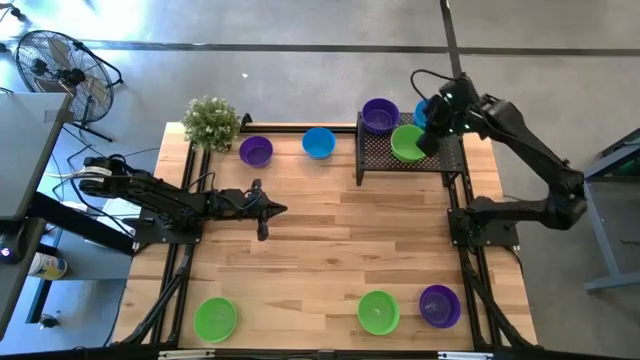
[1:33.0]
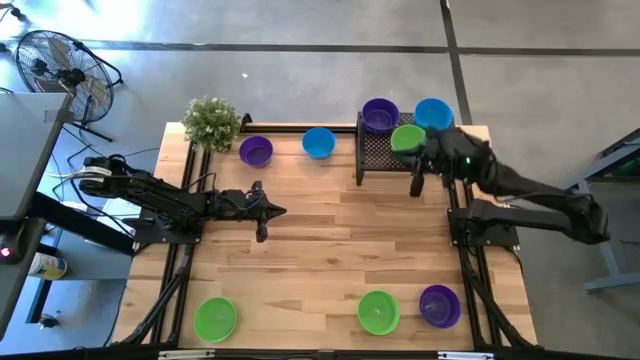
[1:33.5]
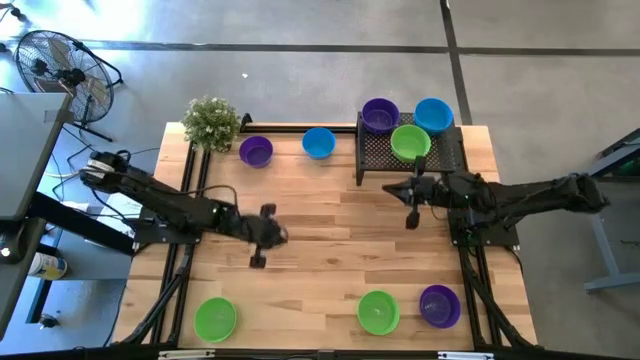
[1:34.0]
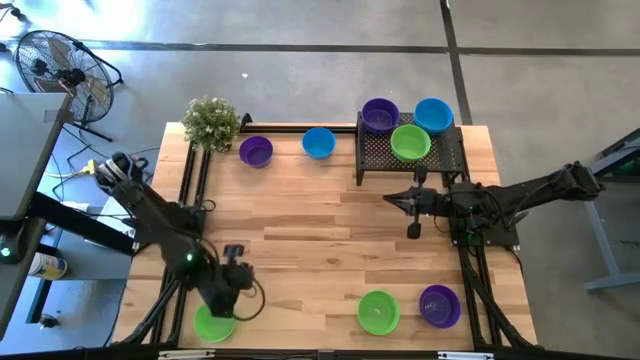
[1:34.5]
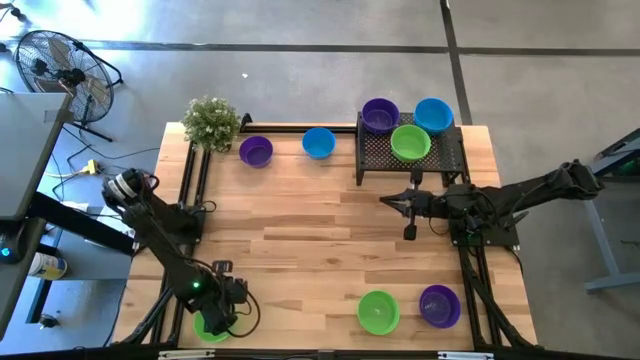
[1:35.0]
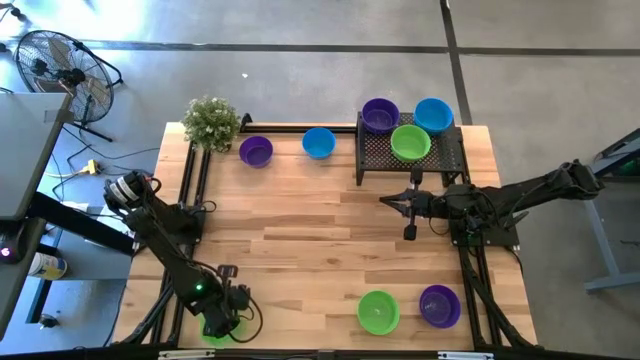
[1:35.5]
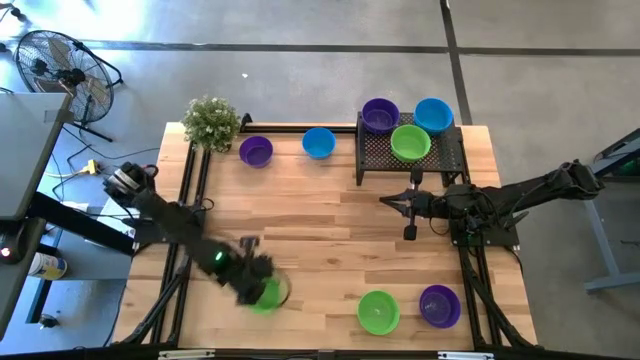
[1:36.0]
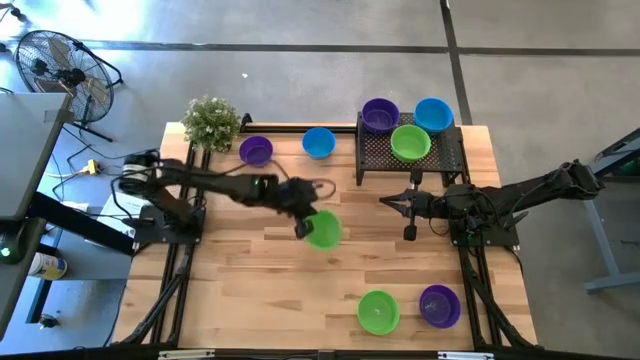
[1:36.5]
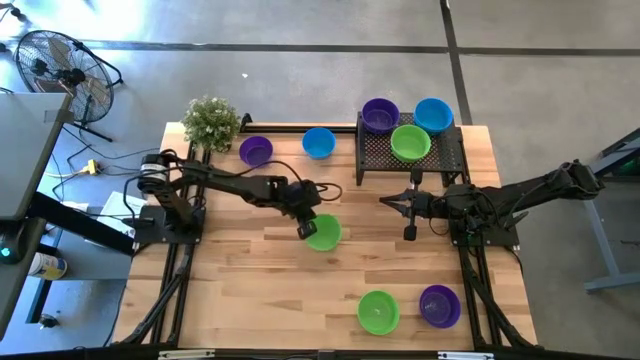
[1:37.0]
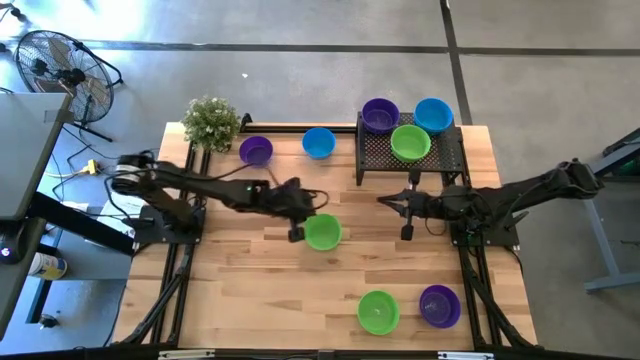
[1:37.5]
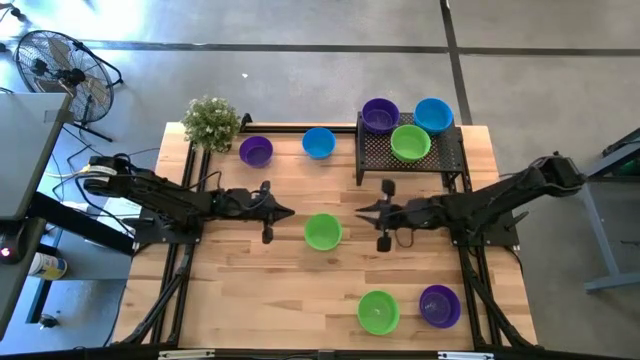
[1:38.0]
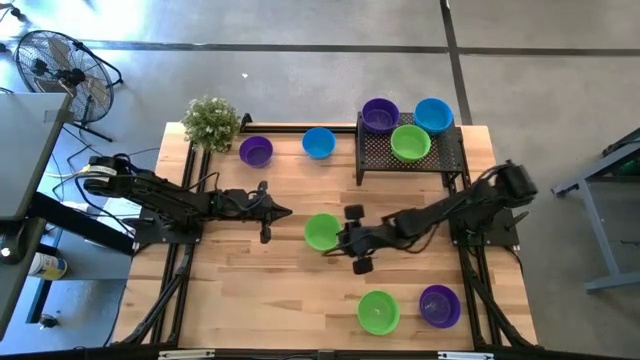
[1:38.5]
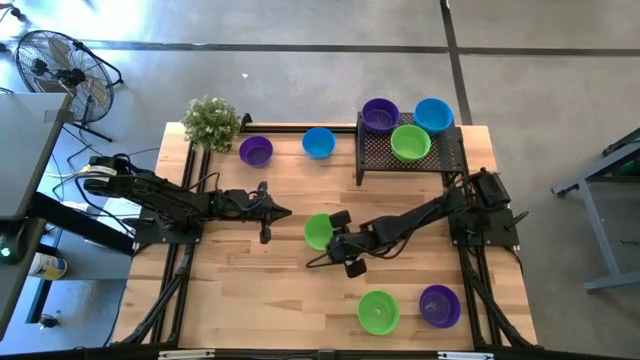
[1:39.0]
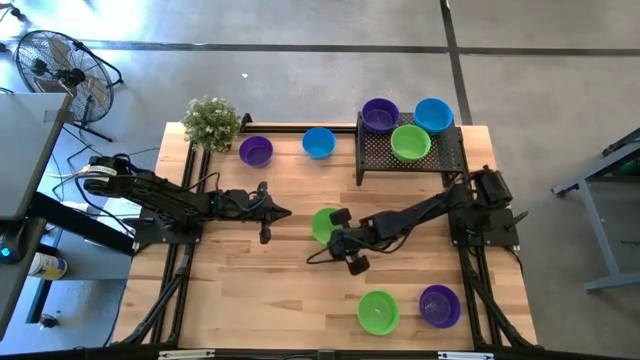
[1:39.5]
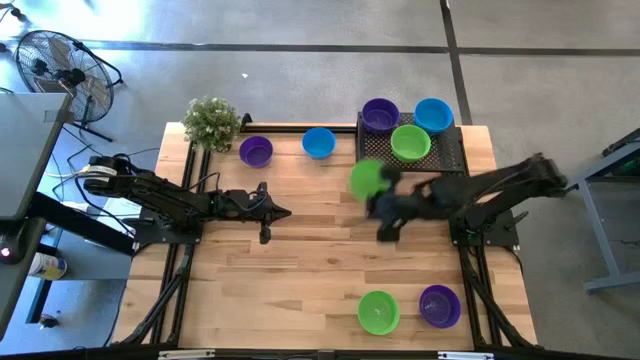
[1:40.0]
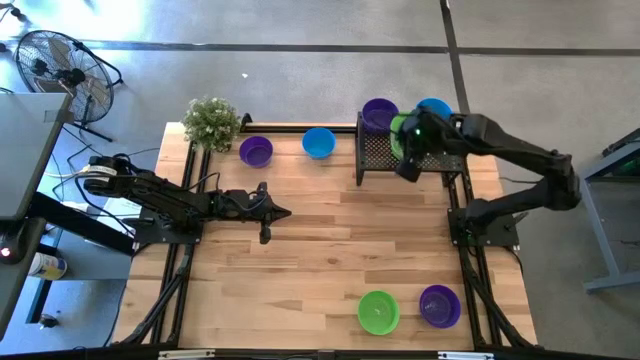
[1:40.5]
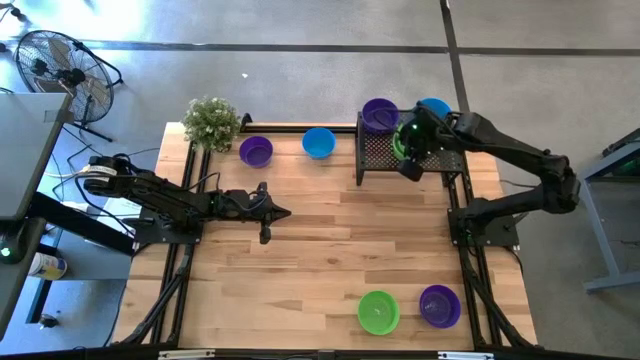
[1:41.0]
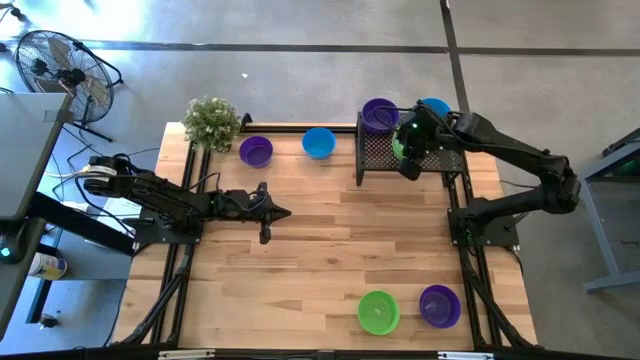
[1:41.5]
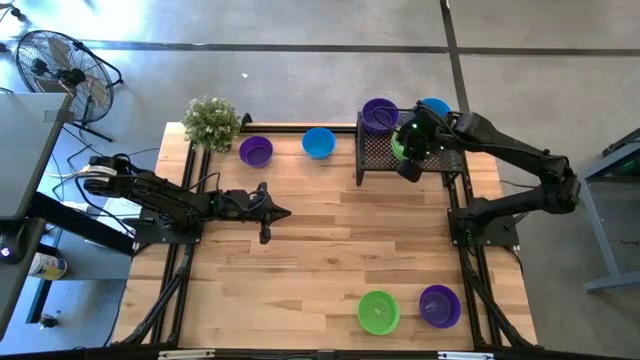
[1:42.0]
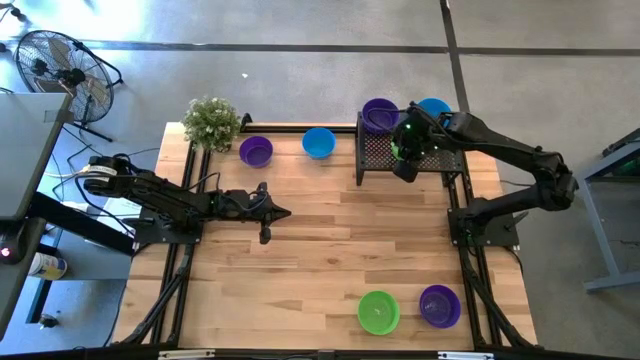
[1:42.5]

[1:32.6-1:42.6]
Task: Pick & Place Mini bowls
Stack the green bowl on the other green bowls on the shelf

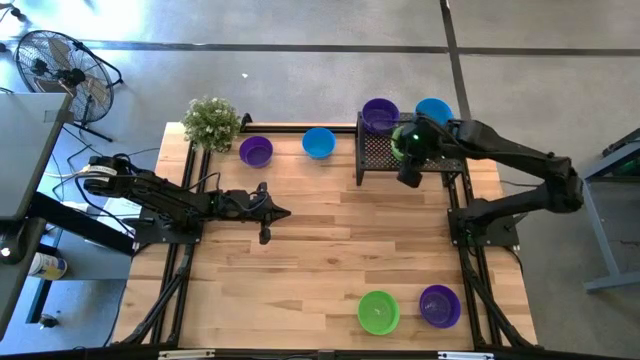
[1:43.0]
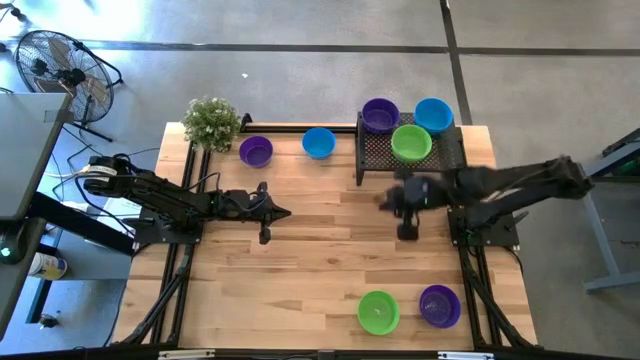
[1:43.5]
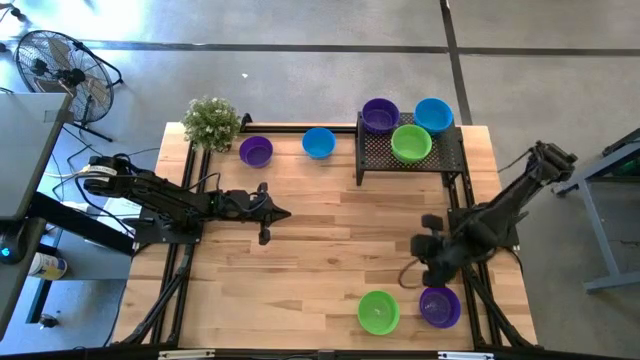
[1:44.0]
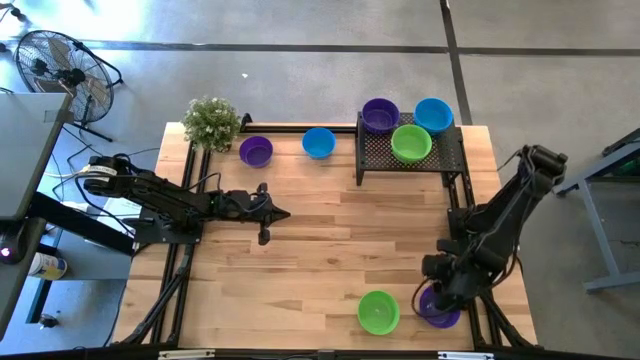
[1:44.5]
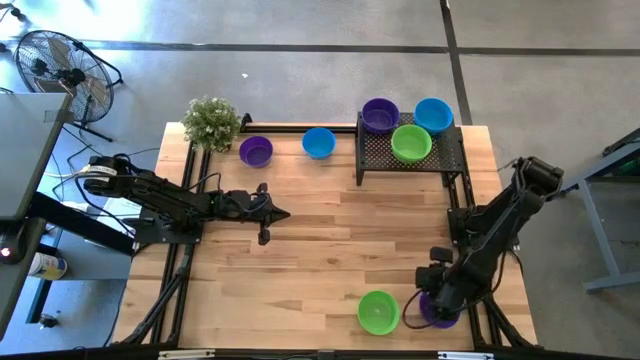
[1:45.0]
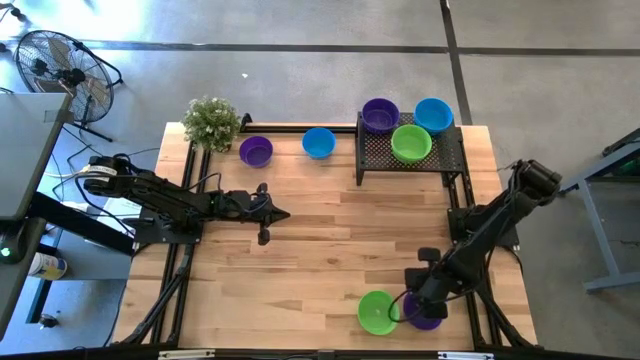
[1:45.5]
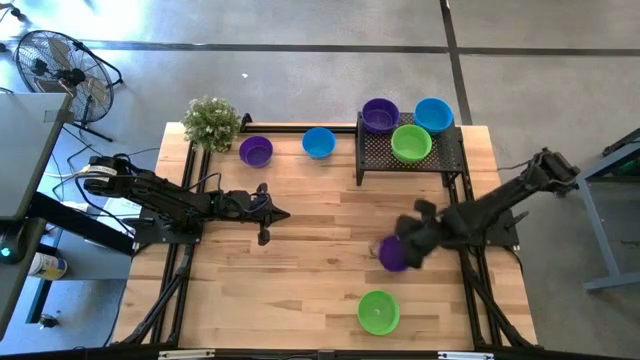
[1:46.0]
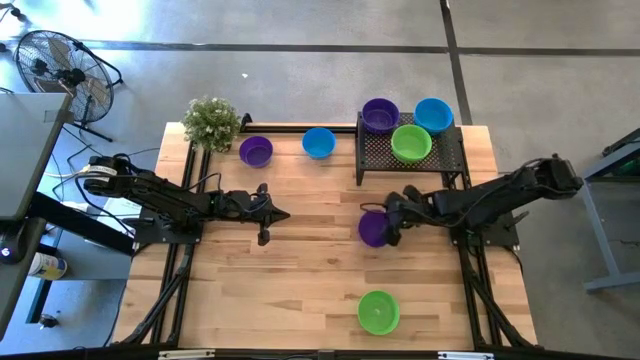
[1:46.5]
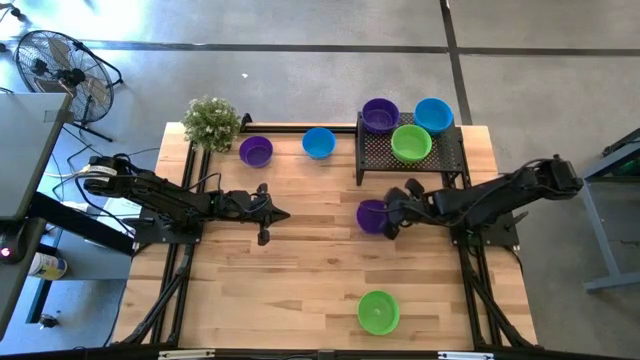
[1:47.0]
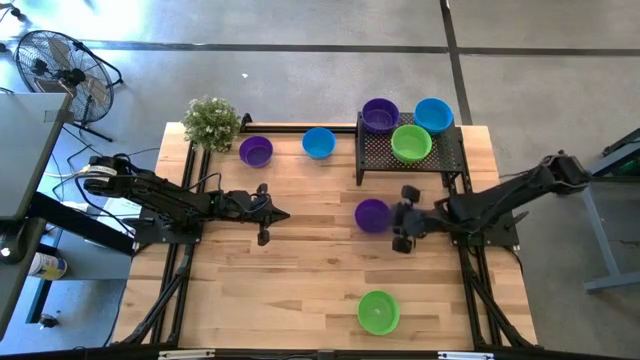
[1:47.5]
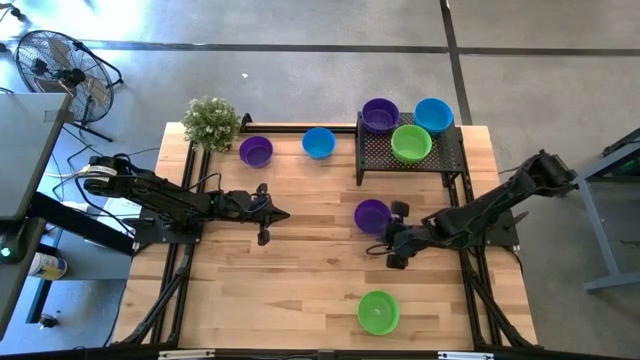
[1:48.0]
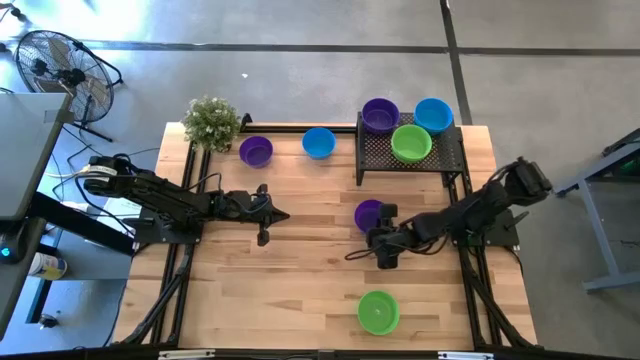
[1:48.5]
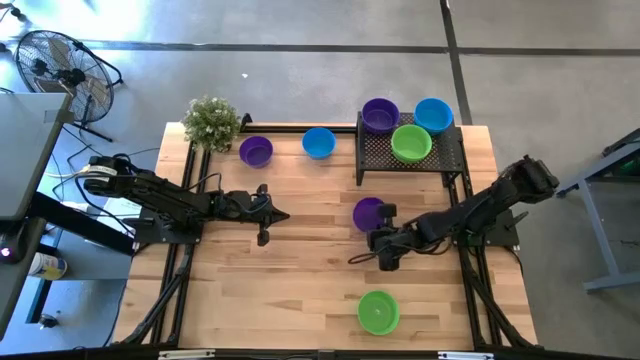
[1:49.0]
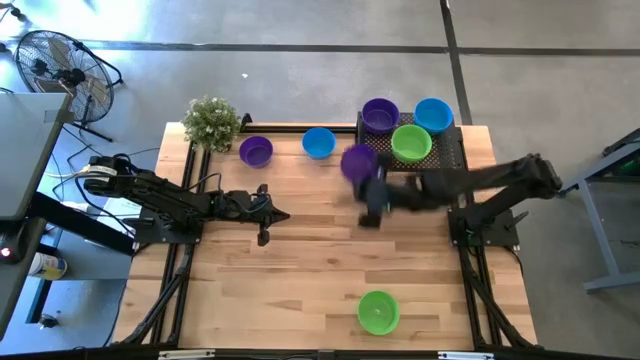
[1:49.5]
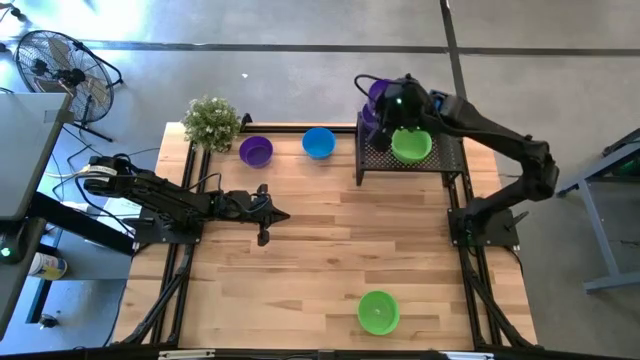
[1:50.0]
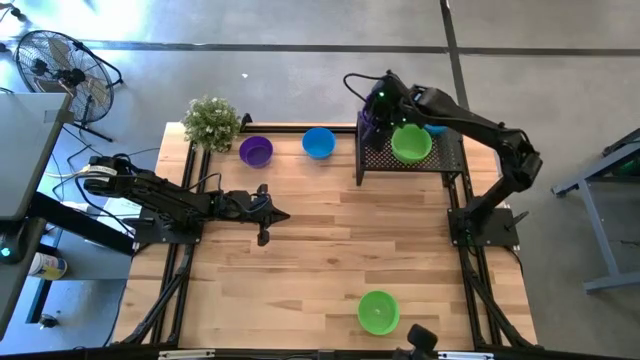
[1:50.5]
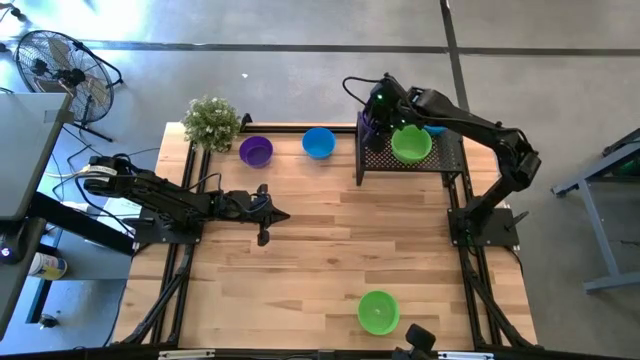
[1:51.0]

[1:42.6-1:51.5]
Stack the violet bowl on the other violet bowls on the shelf

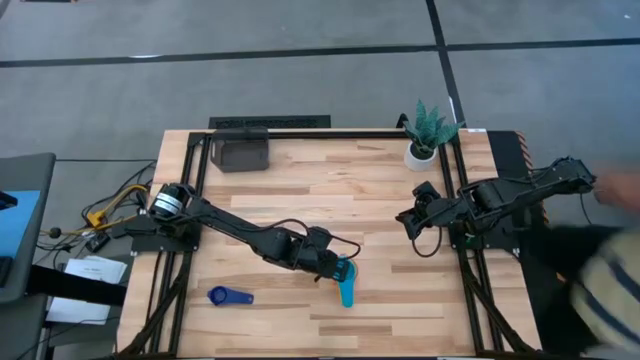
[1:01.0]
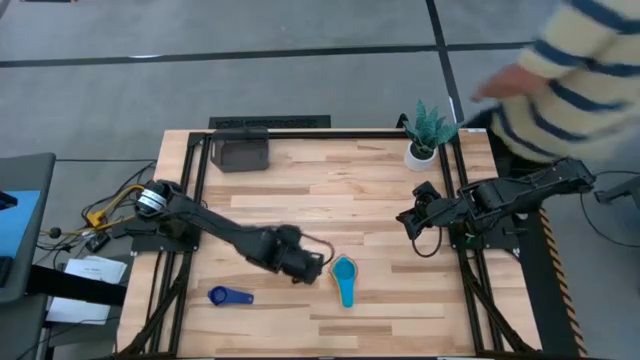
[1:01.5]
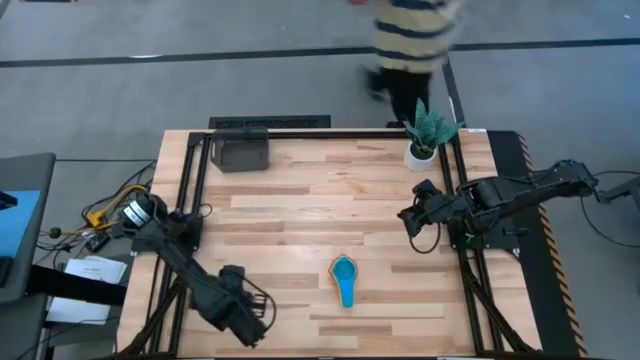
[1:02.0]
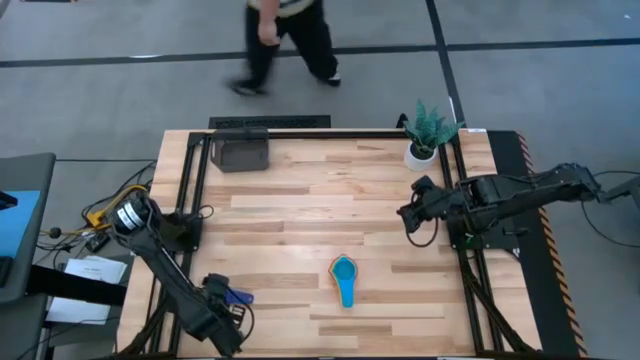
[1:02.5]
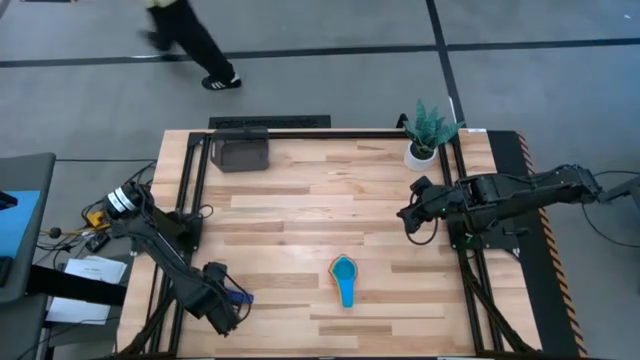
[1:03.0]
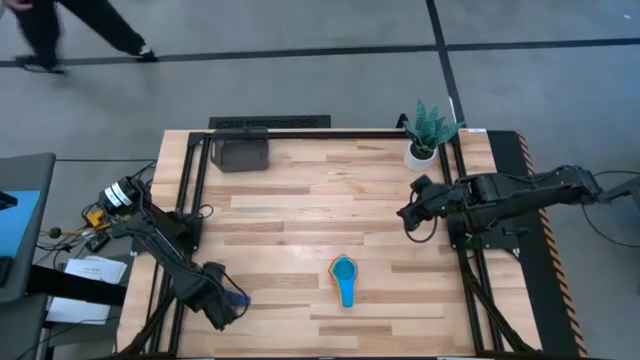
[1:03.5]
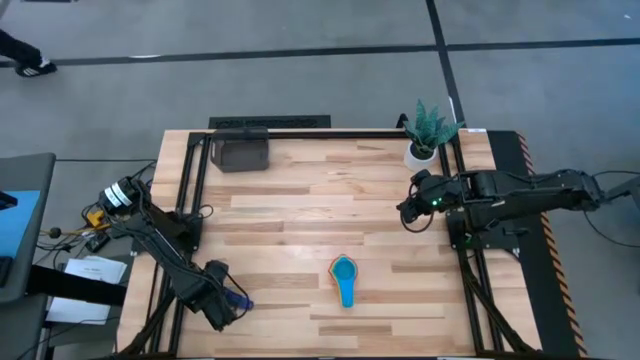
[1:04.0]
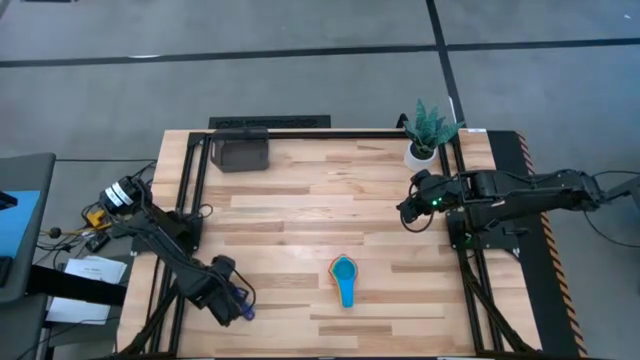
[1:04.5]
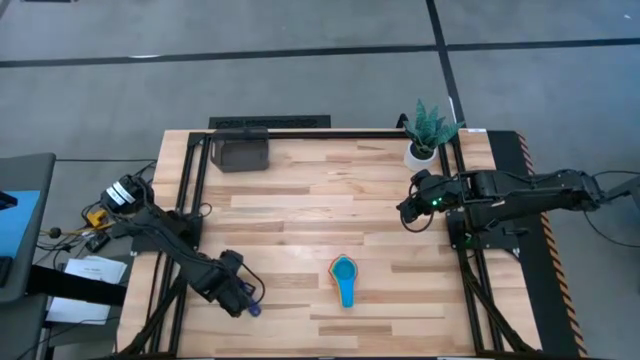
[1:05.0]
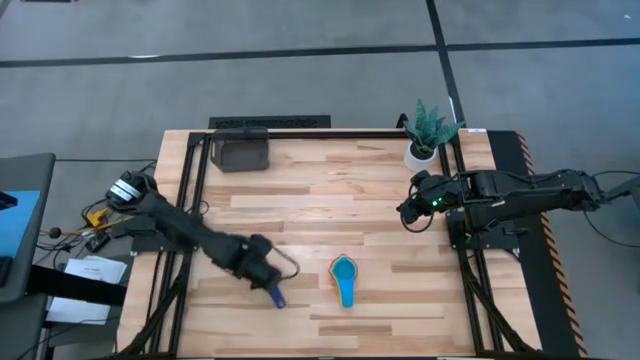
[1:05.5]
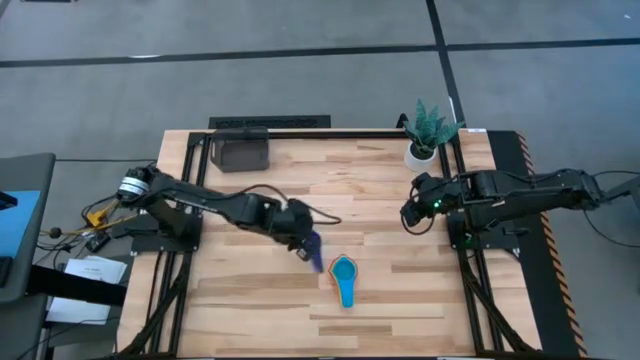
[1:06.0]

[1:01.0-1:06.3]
Task: Nest measuring cups in basket
Stack the dark blue measuring cup on top of the light blue measuring cup
